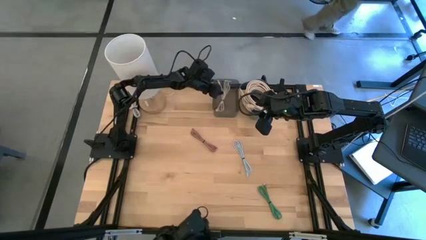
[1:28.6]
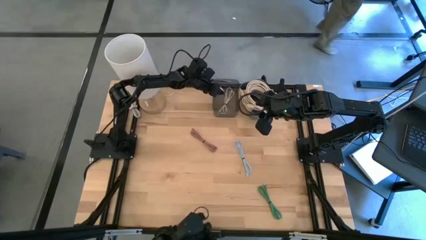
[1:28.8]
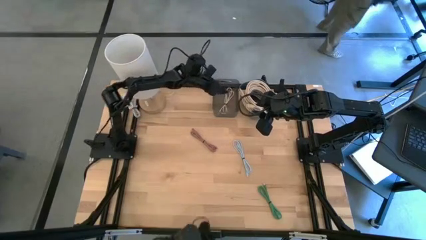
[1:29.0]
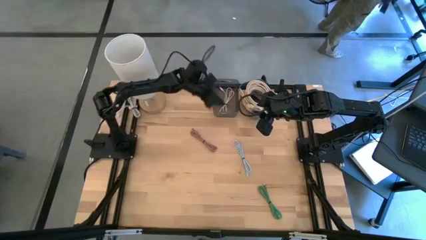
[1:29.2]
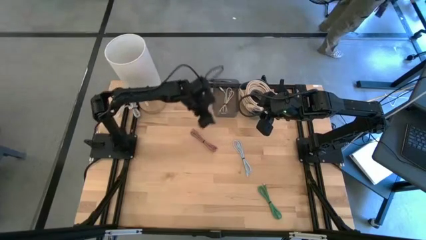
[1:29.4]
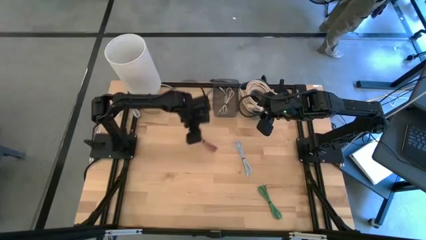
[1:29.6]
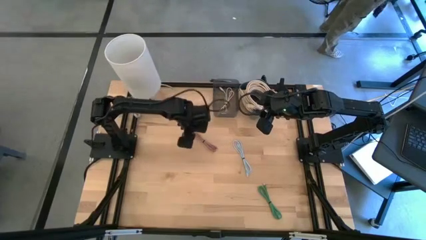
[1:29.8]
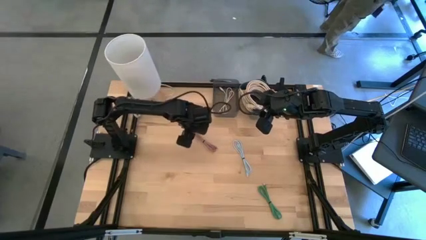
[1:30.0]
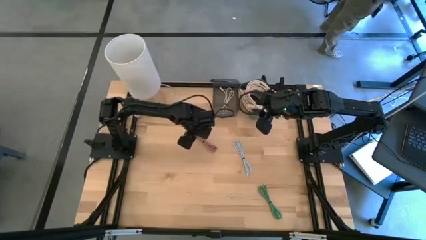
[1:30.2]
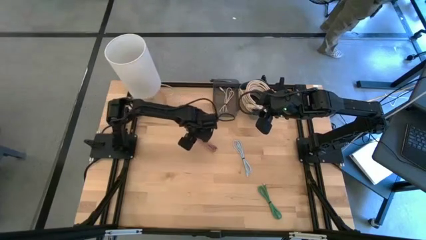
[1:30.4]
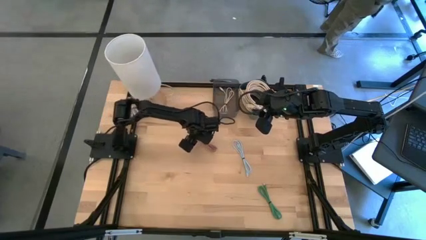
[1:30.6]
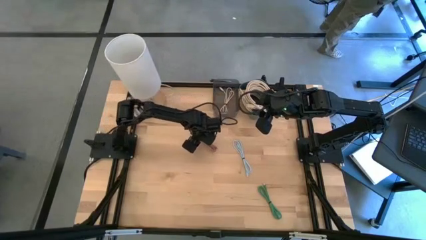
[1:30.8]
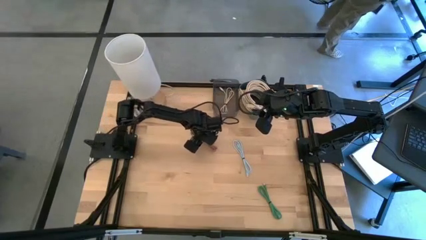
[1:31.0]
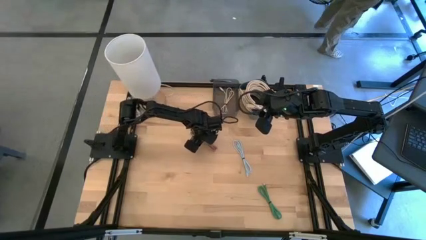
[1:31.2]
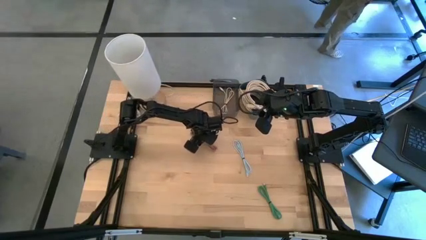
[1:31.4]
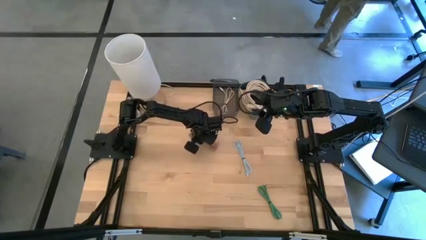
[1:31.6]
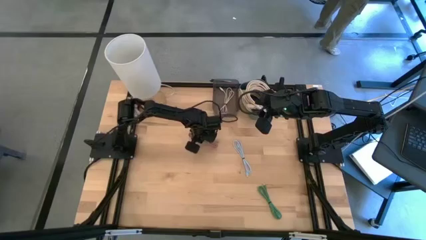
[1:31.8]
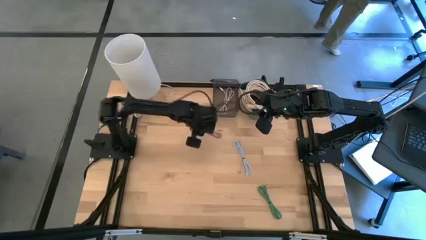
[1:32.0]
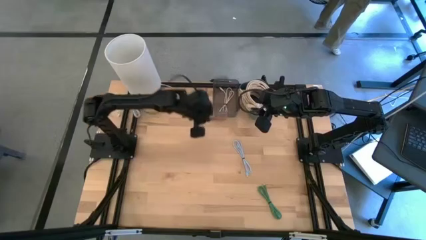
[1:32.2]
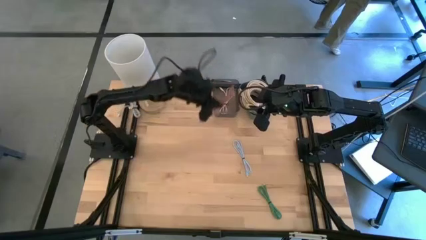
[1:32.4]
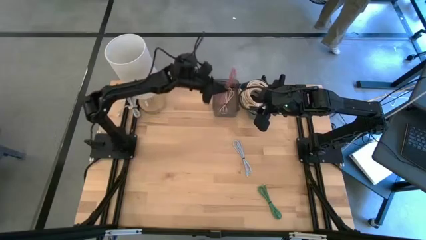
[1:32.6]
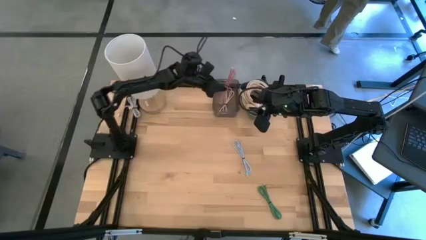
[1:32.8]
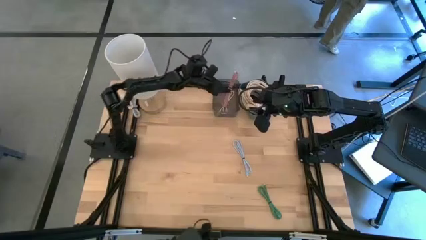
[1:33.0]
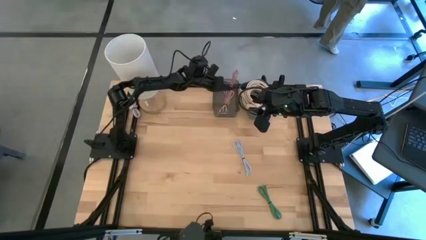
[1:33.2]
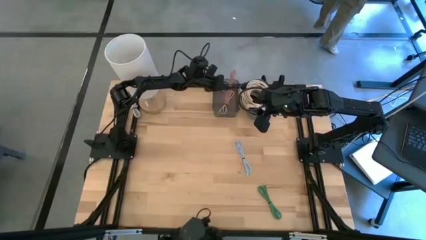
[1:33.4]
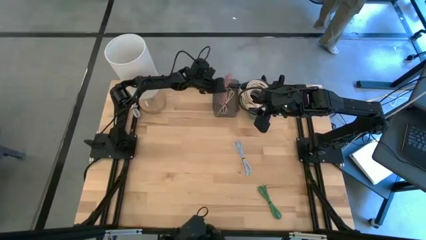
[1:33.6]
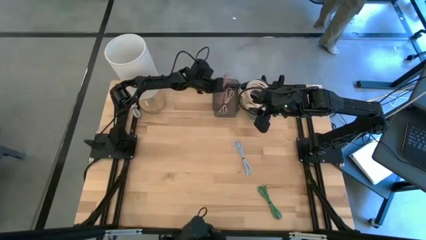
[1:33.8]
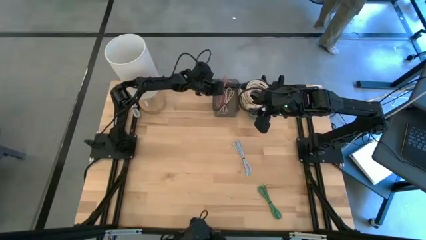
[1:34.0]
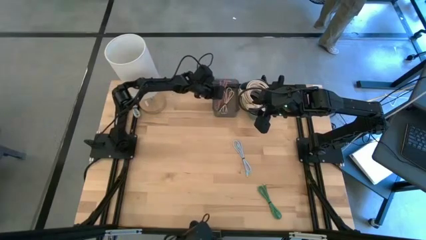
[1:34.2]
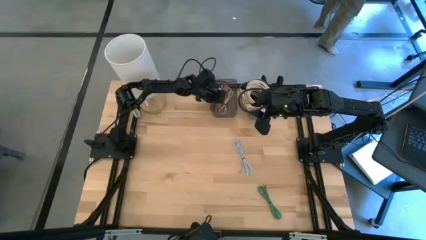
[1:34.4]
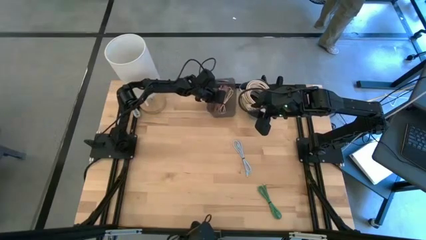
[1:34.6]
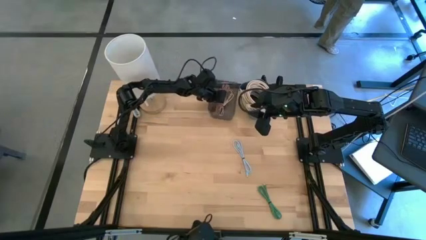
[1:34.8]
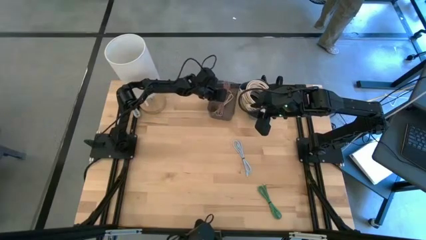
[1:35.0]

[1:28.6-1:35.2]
Put the pink charger cable into the black transparent bin

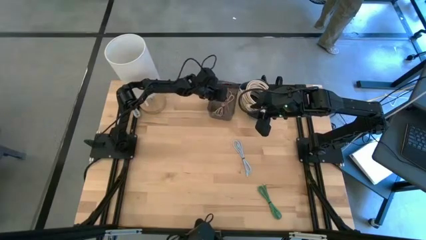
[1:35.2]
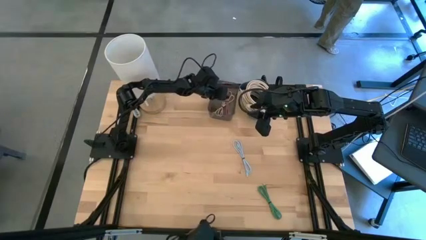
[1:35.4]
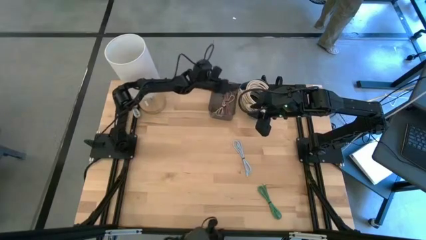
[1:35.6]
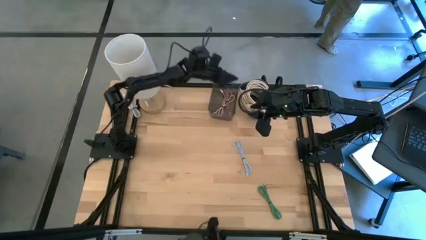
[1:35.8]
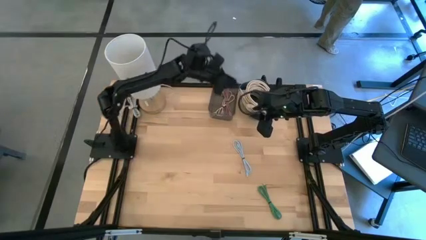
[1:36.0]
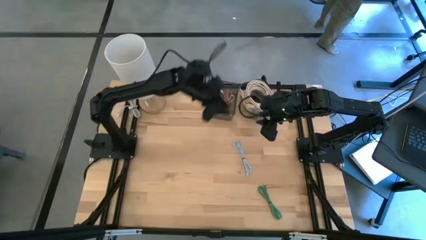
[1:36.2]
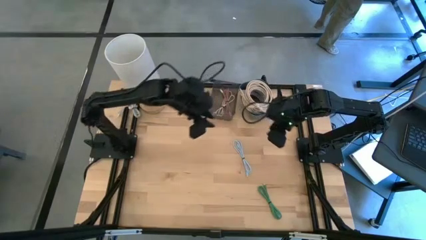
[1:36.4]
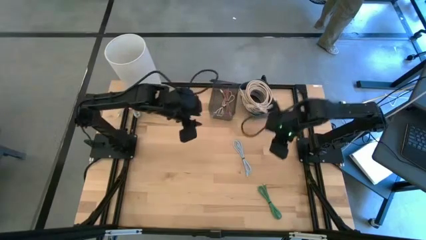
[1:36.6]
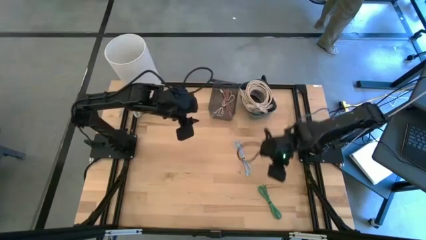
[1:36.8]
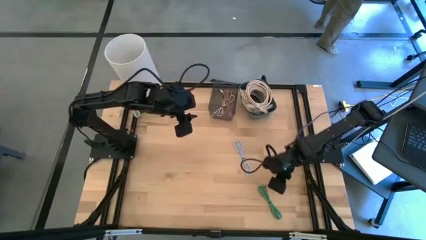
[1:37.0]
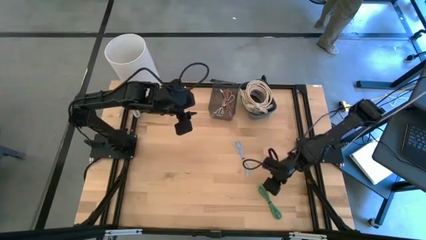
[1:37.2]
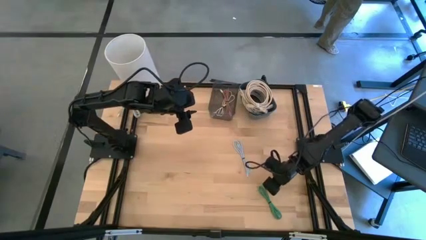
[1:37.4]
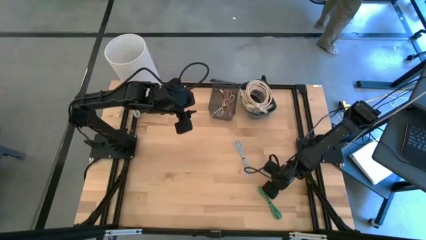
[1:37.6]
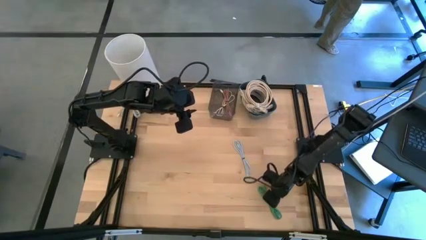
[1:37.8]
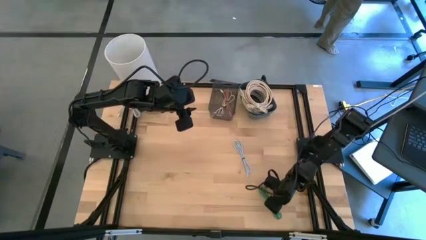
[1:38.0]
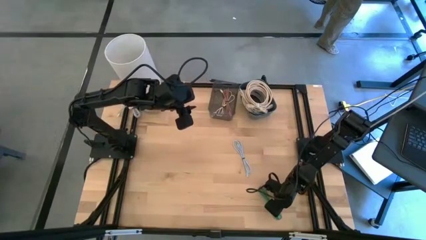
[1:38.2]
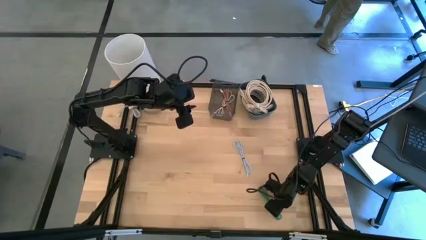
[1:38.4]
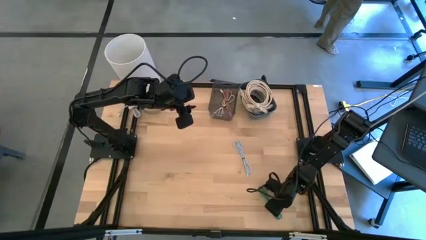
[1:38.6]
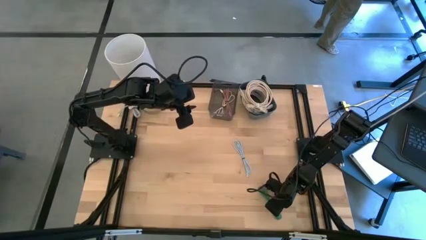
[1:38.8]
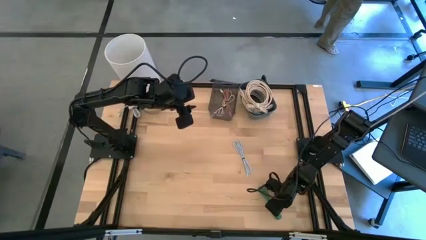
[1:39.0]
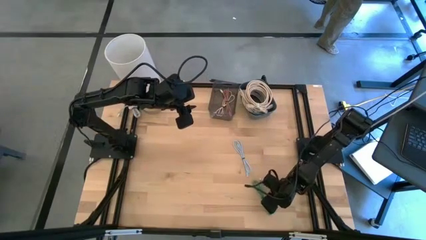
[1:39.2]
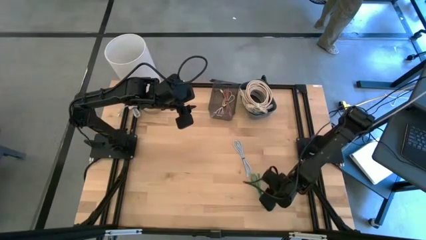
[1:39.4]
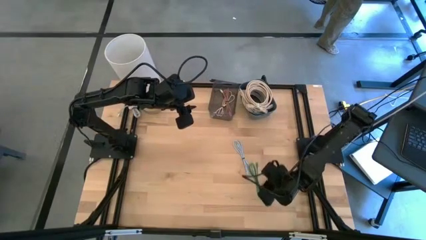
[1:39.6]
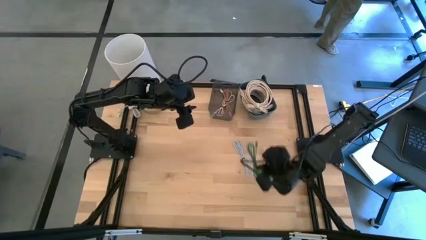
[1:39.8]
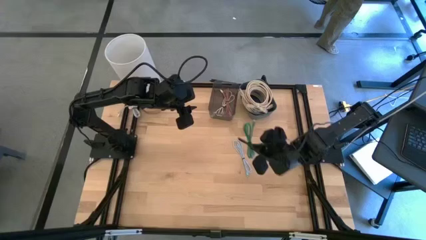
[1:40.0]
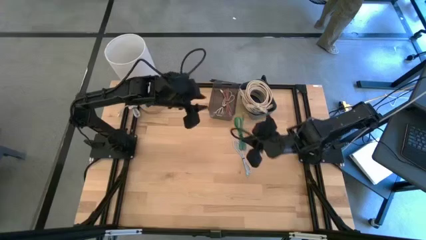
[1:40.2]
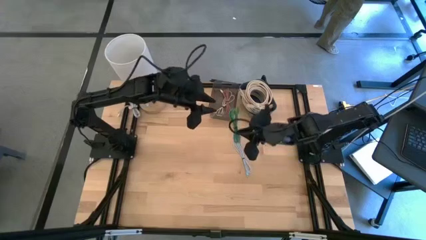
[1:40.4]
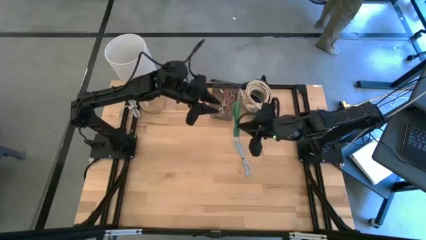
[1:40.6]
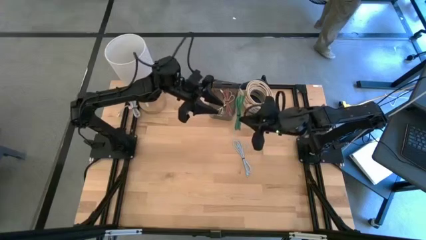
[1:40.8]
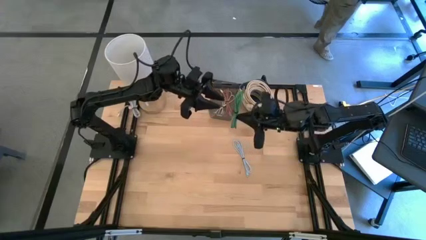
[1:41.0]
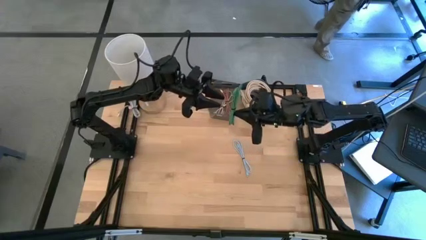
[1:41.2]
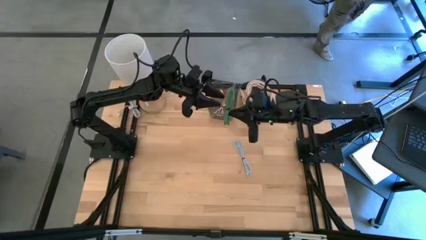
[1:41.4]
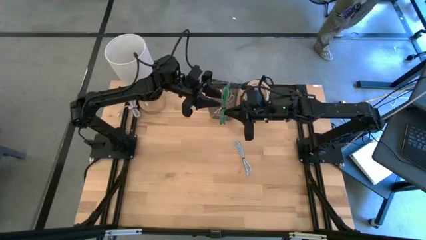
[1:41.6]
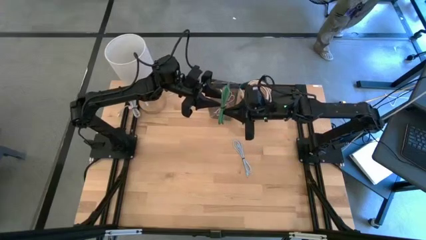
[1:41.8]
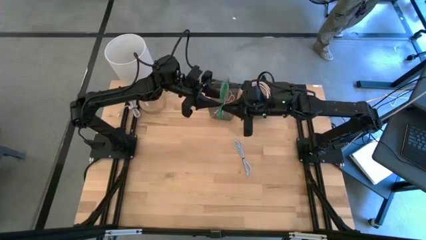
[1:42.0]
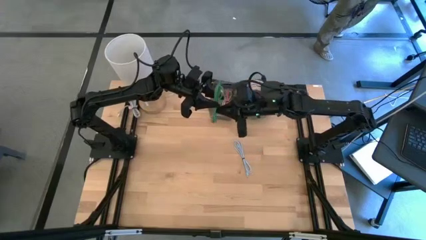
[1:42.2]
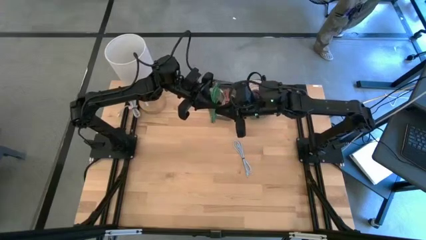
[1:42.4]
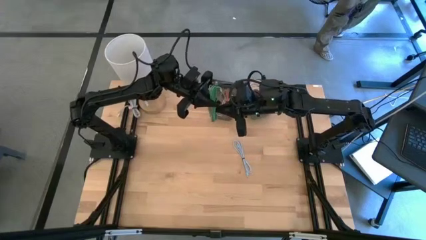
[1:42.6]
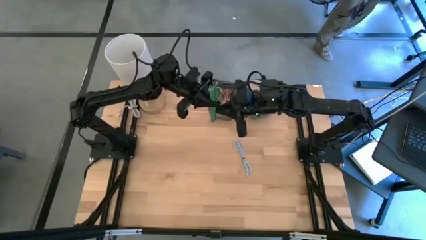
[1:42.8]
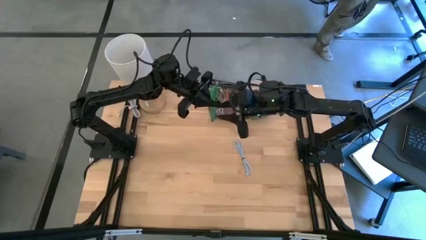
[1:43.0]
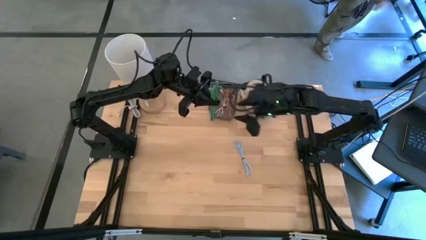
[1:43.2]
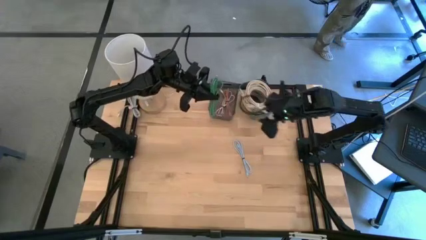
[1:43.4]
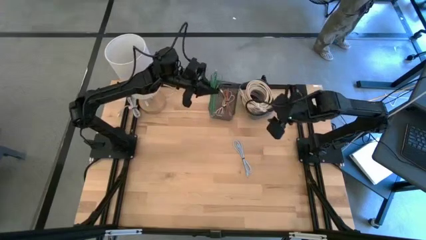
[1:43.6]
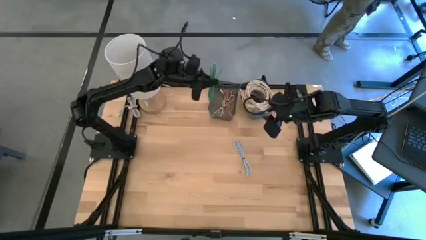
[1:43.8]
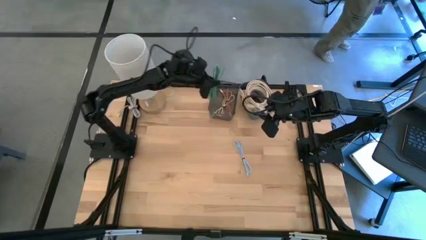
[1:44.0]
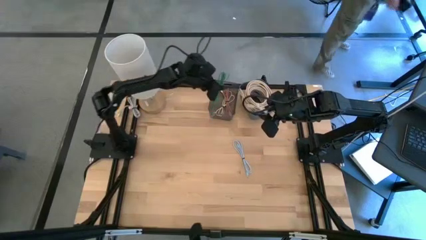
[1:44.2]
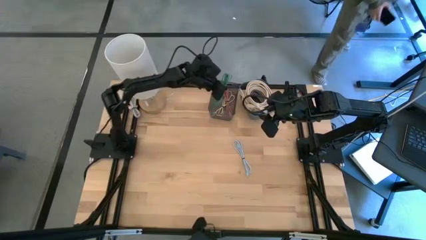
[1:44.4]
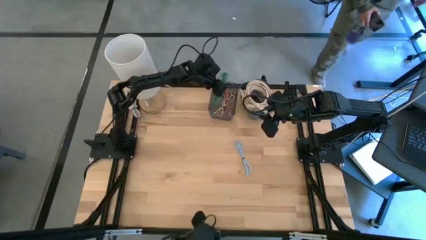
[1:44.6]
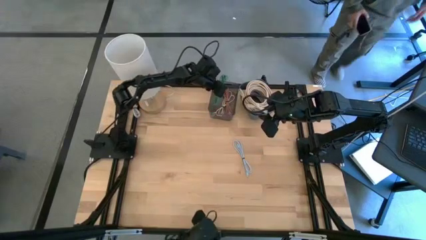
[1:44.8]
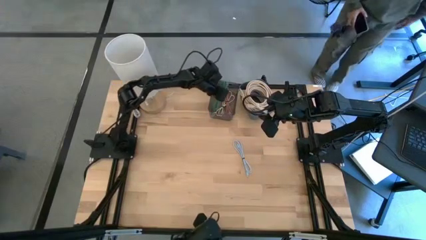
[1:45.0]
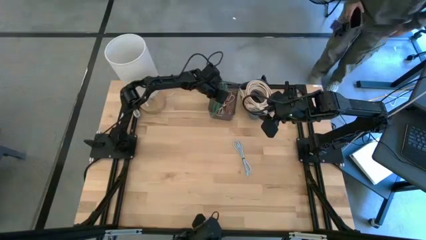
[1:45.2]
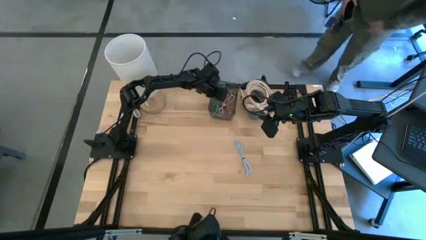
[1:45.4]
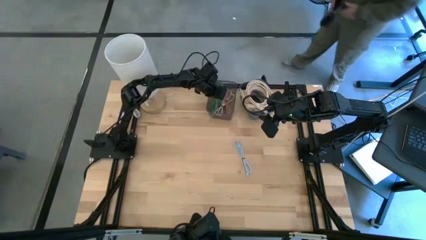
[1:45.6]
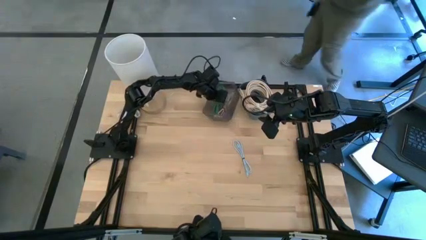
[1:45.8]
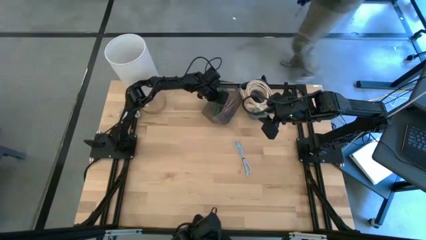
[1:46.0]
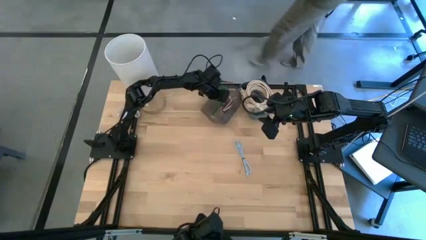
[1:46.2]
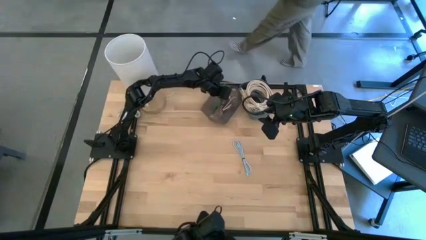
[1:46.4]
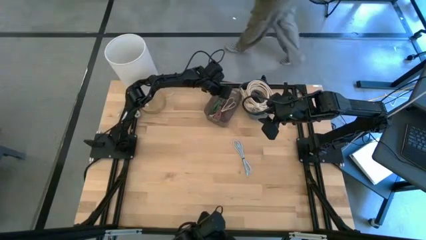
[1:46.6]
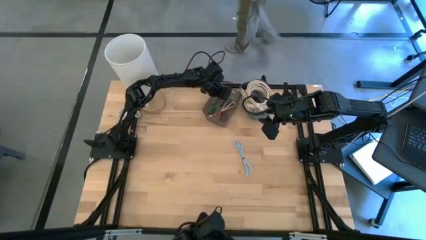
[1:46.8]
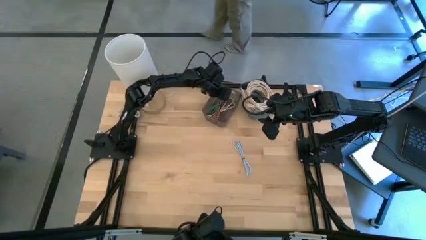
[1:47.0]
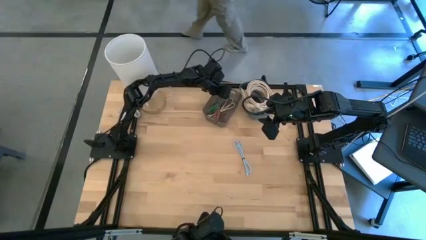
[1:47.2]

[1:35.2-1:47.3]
Put the green charger cable into the black transparent bin
